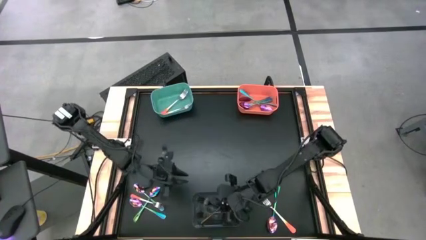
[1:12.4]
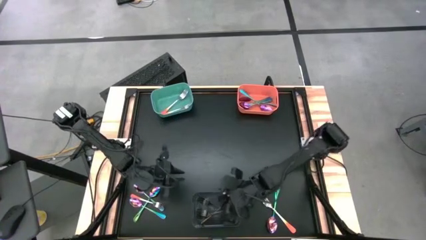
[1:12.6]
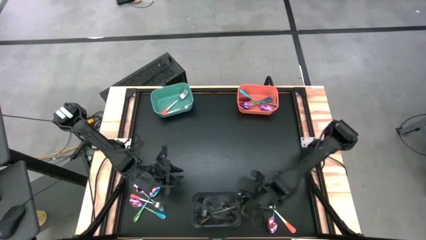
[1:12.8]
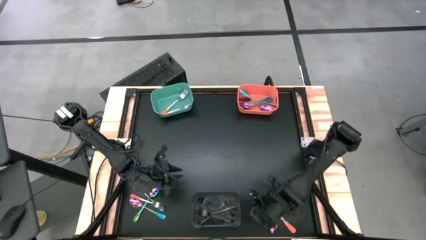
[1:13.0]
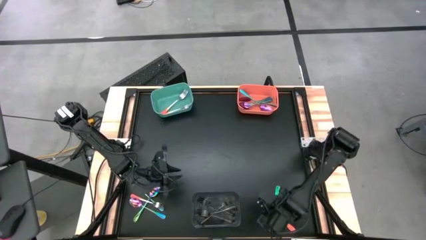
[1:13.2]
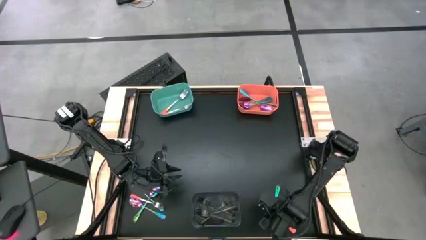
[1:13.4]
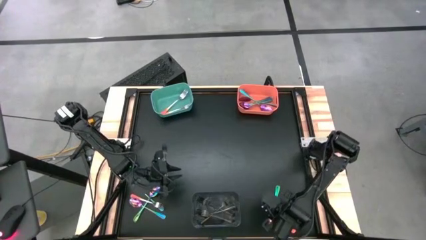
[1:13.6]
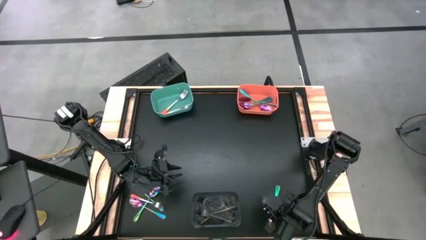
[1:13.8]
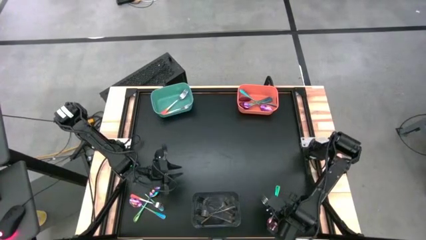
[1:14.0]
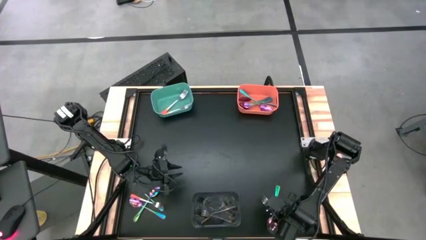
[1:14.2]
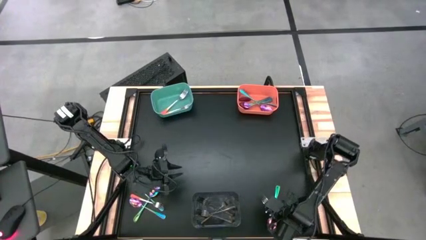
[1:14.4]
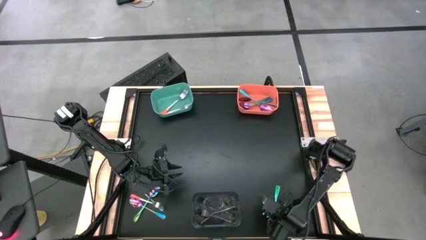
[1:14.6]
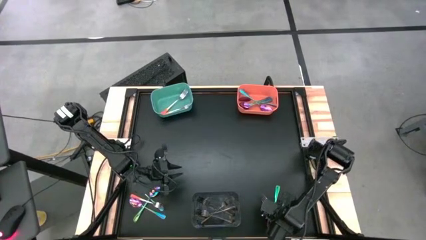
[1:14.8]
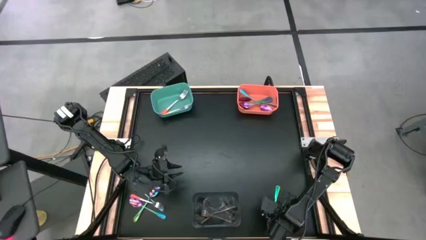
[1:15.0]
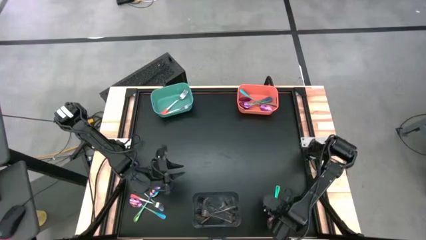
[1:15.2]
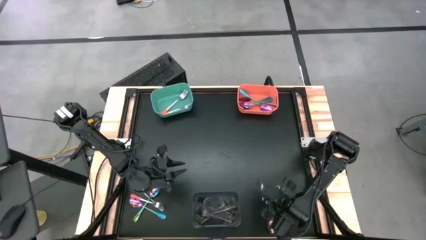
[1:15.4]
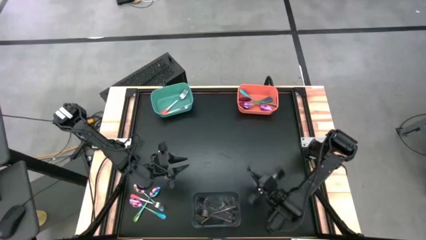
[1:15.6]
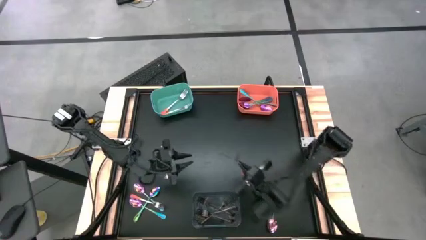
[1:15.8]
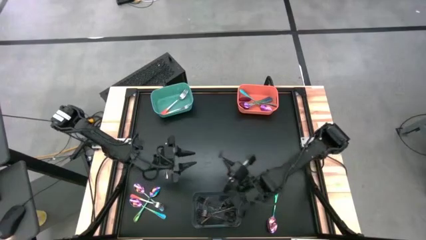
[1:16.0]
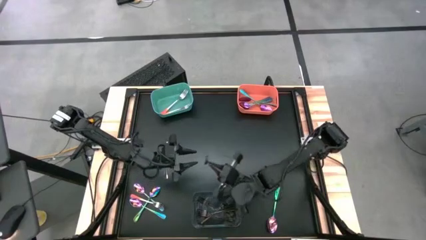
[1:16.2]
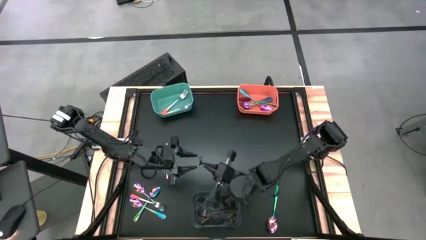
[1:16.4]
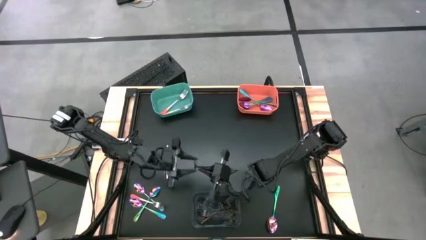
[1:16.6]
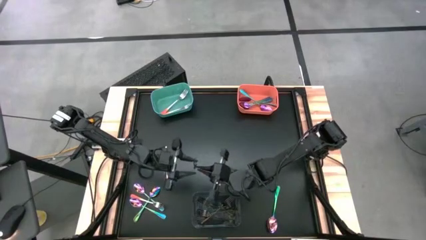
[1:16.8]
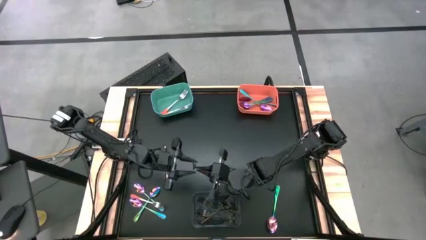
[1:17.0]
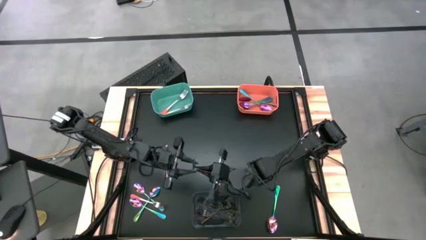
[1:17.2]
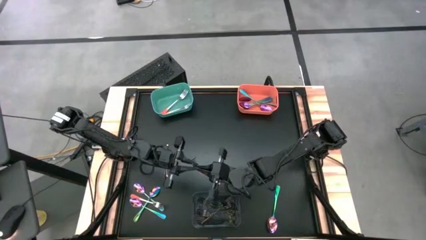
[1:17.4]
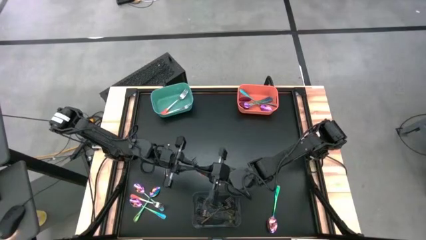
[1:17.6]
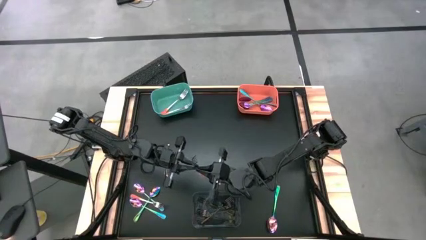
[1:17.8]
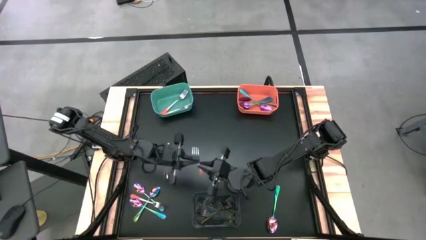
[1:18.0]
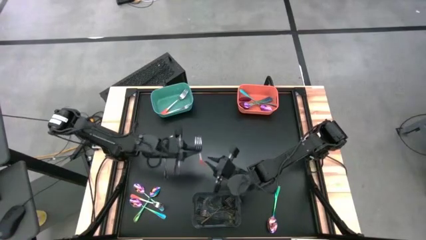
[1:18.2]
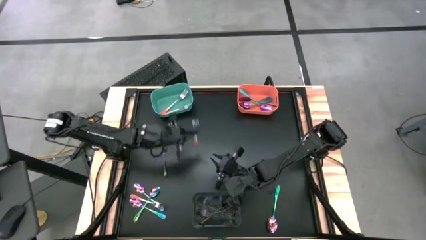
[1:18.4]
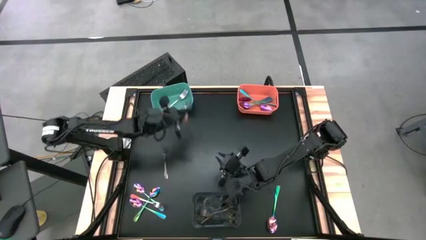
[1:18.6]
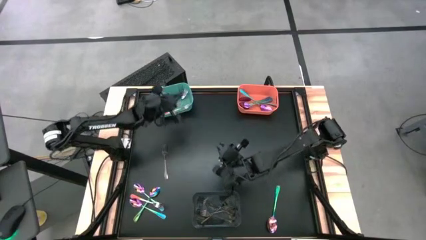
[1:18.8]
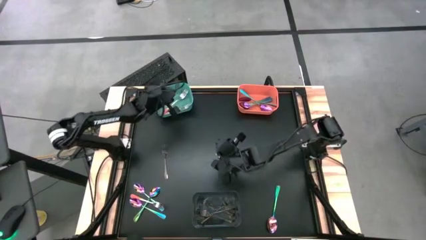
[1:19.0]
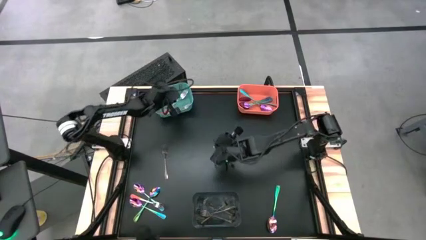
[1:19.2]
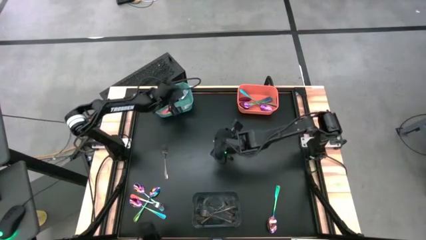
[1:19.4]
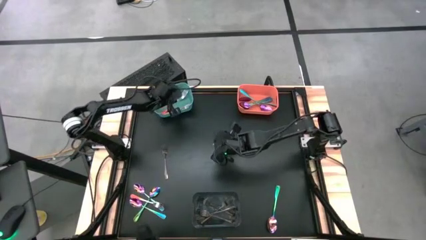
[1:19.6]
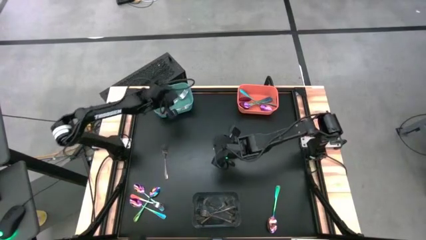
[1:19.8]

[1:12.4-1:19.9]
Task: Sort silverware by color (type)
Put the orange fork into the green bin

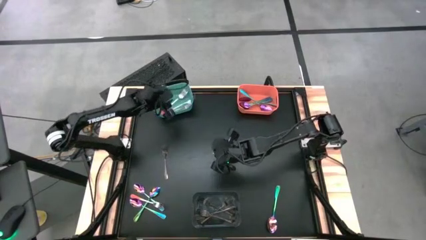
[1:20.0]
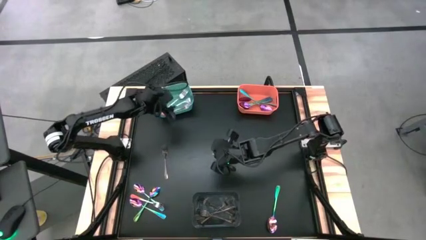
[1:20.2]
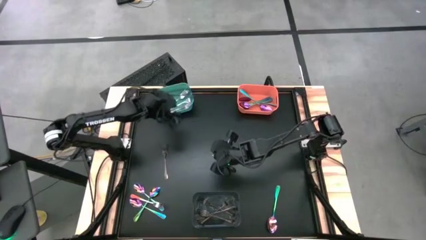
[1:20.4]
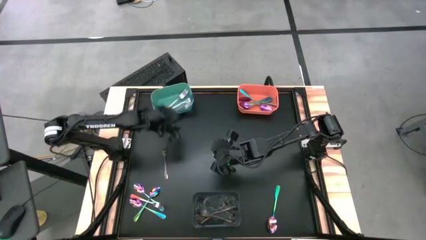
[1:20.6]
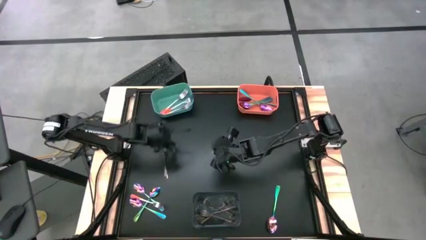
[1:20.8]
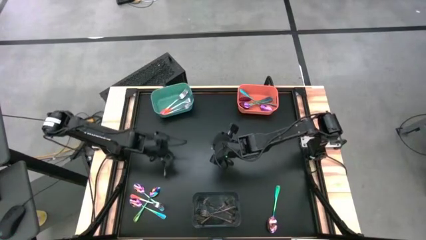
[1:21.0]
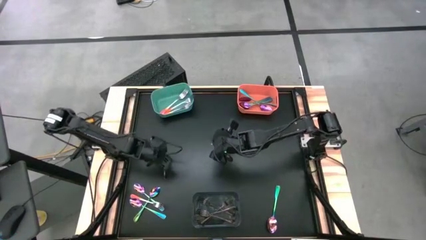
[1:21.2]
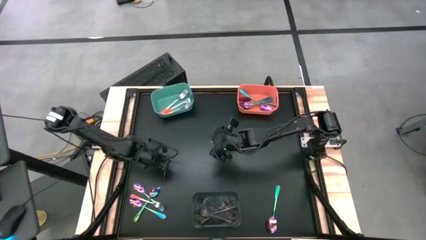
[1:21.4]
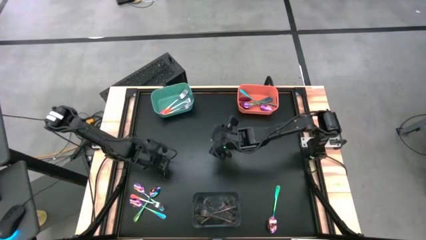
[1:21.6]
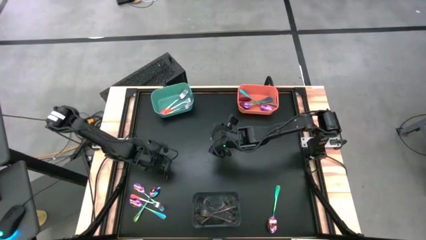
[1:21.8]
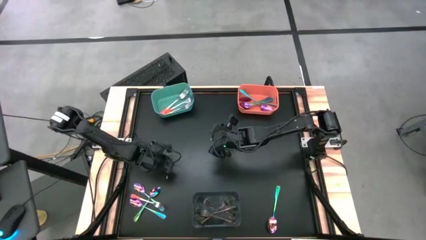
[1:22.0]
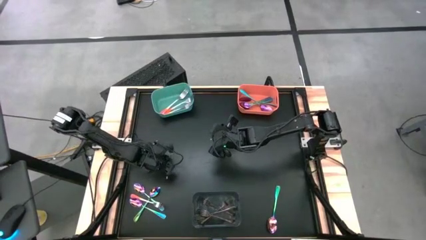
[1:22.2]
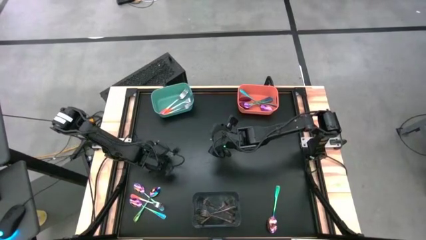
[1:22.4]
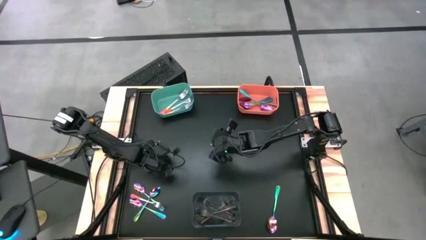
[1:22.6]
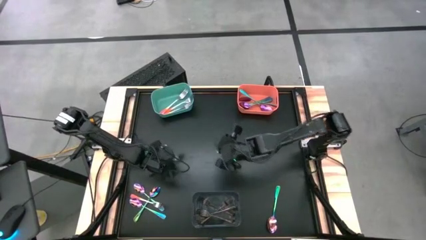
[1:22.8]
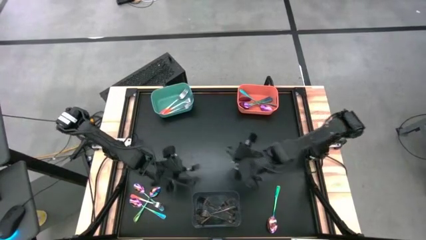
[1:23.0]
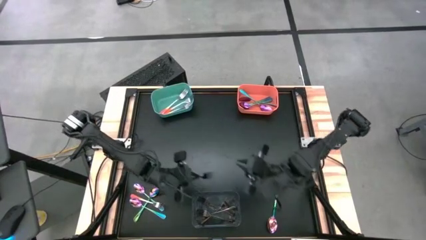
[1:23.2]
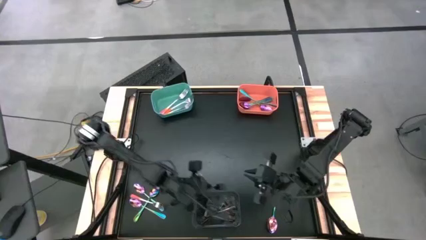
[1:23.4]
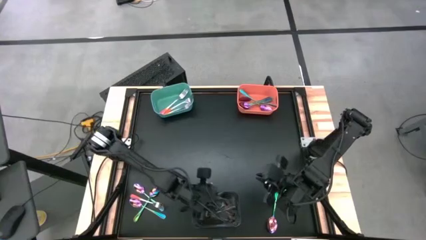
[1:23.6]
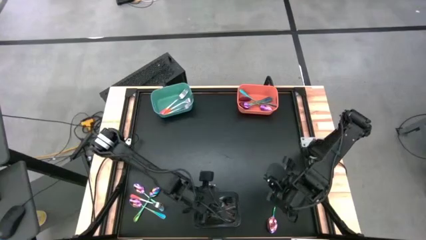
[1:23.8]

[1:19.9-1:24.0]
Put the black fork into the black bin

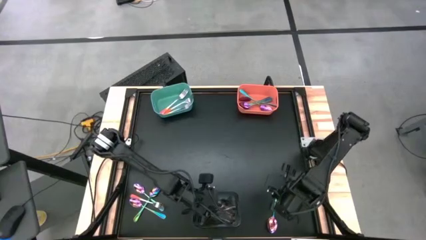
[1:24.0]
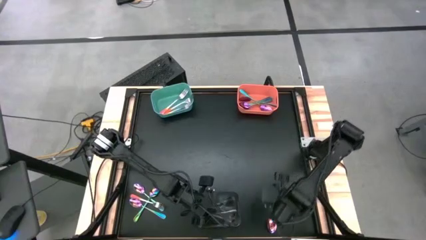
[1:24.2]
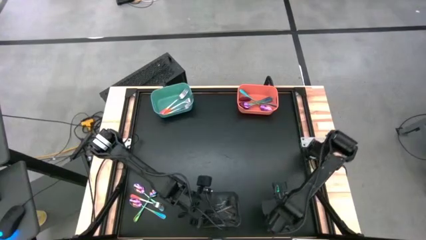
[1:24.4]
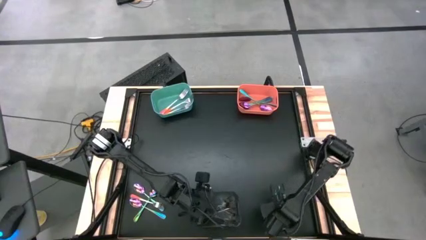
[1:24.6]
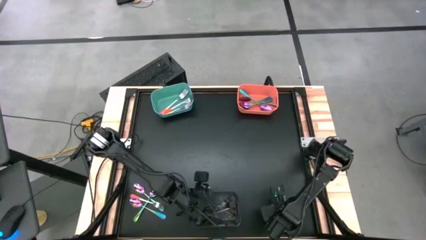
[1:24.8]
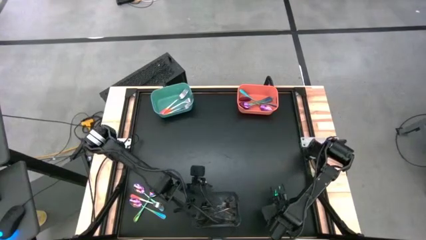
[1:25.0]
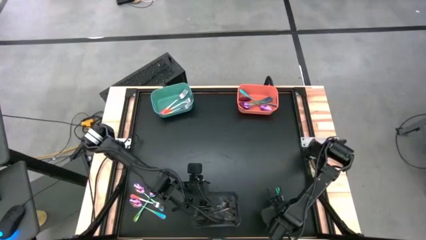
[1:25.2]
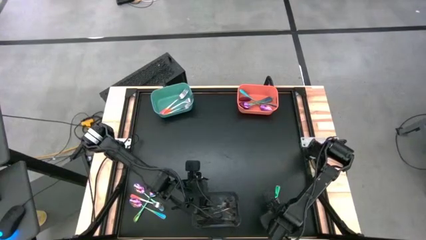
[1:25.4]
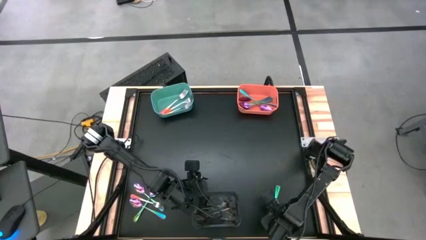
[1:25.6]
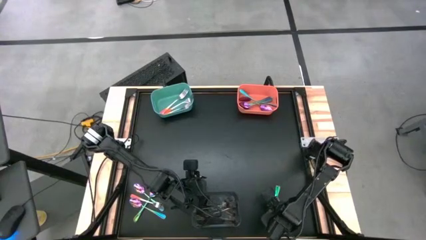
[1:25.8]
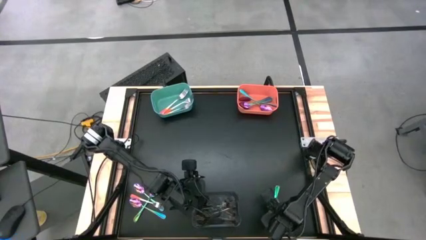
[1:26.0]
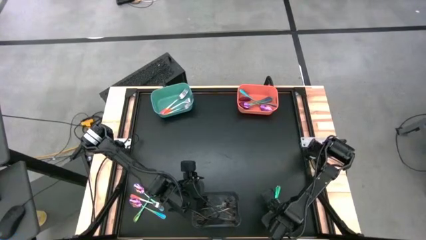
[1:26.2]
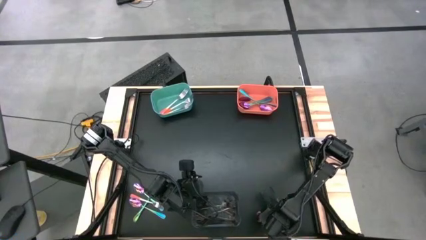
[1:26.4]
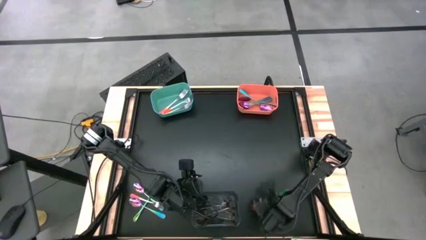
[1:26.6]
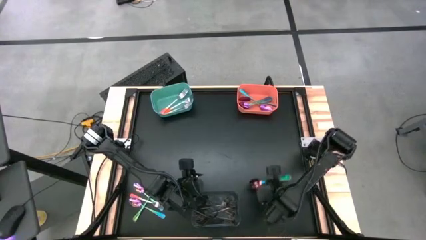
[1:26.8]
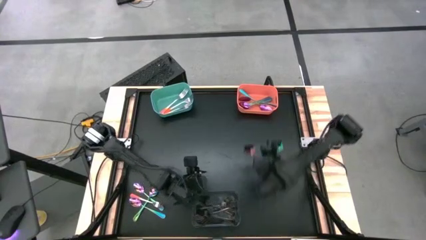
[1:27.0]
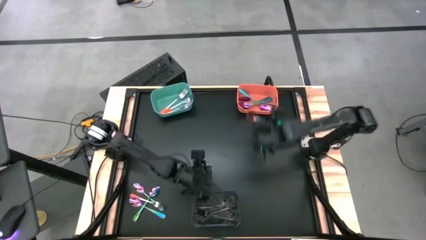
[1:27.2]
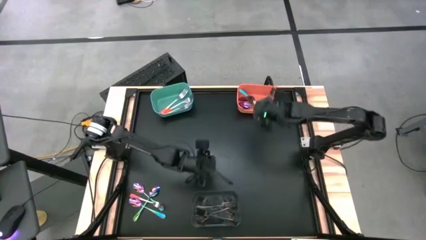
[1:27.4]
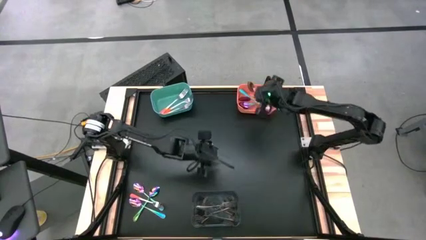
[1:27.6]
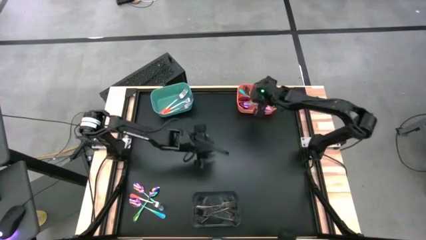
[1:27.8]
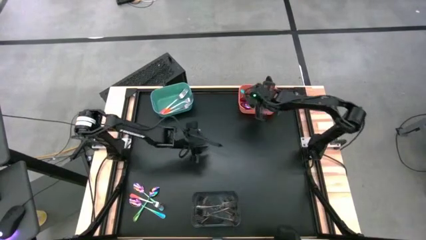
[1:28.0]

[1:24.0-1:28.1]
Put the blue spoon into the orange bin
